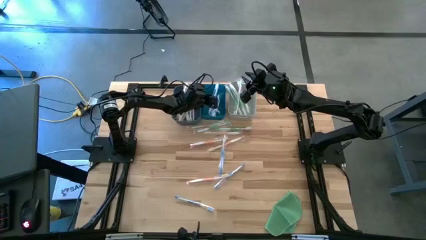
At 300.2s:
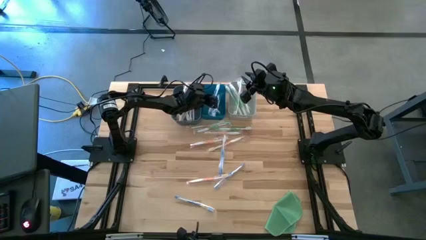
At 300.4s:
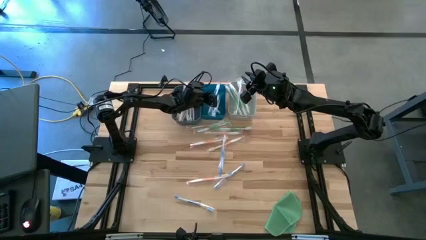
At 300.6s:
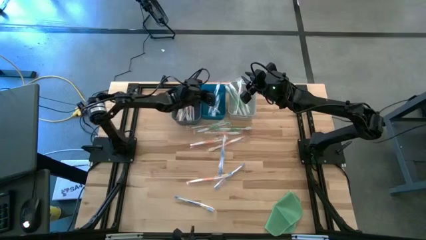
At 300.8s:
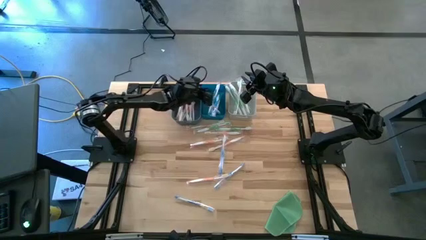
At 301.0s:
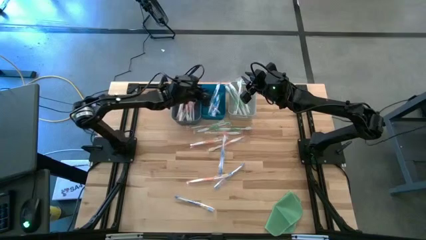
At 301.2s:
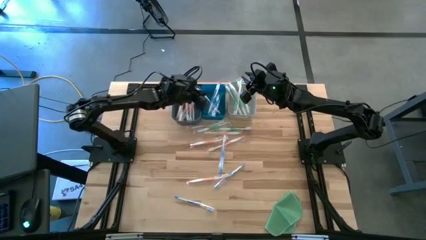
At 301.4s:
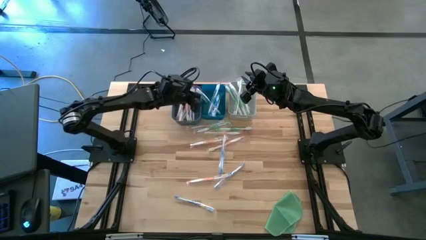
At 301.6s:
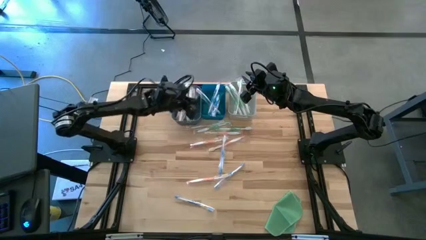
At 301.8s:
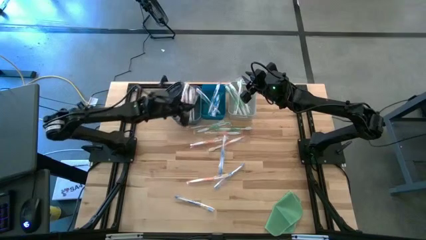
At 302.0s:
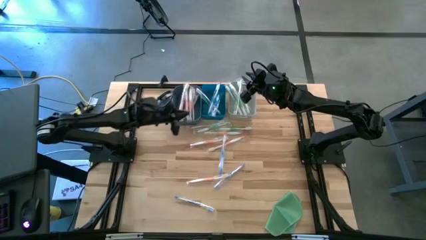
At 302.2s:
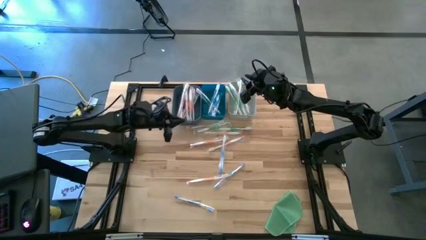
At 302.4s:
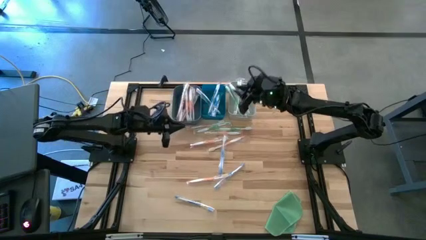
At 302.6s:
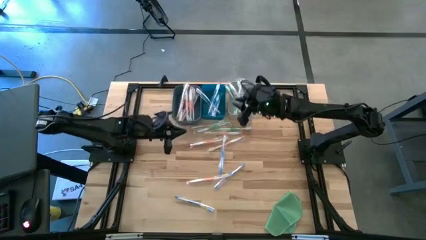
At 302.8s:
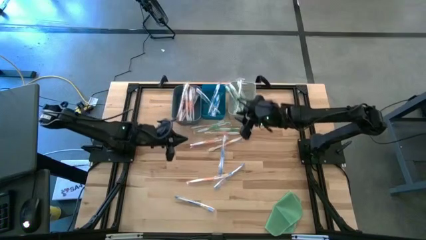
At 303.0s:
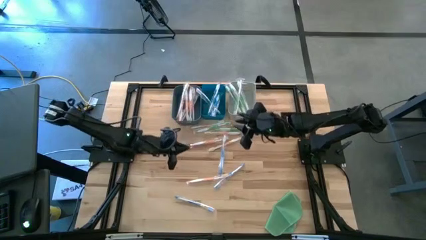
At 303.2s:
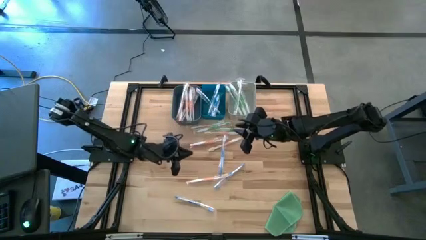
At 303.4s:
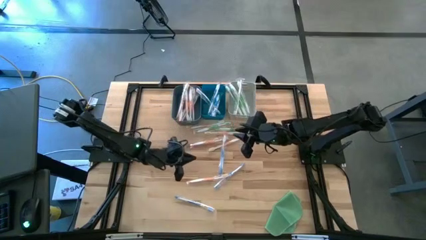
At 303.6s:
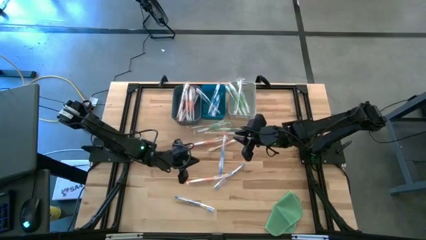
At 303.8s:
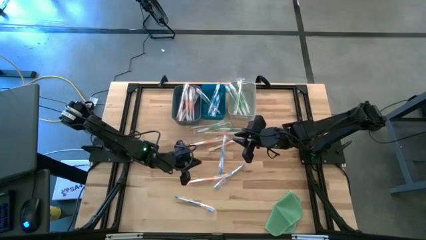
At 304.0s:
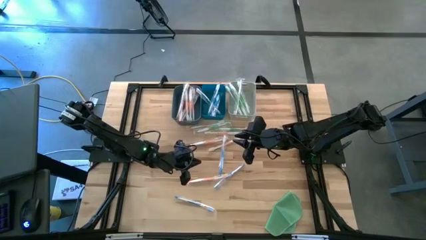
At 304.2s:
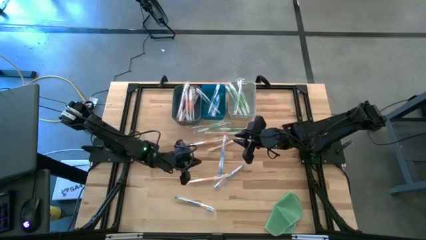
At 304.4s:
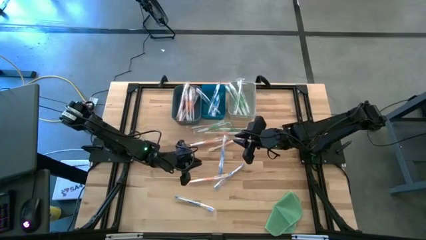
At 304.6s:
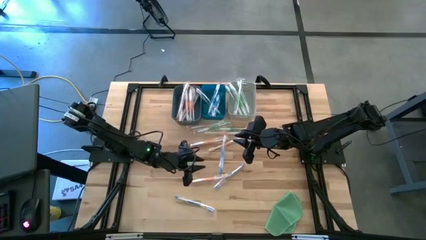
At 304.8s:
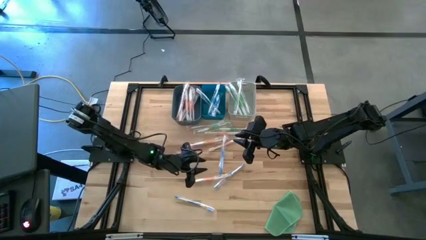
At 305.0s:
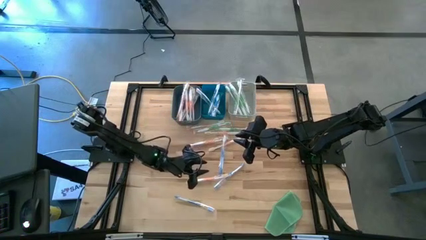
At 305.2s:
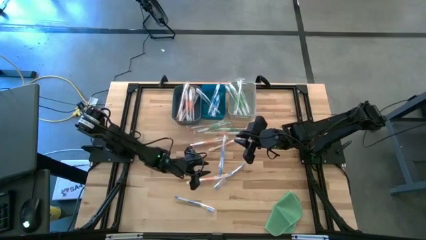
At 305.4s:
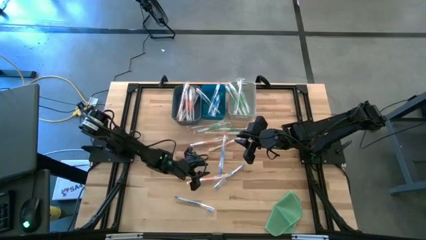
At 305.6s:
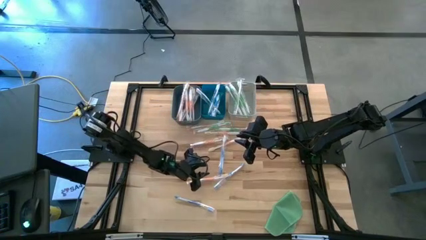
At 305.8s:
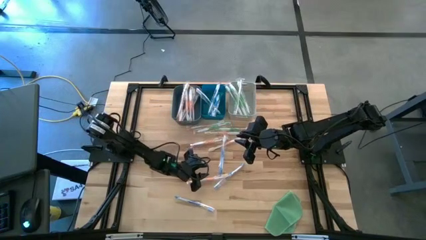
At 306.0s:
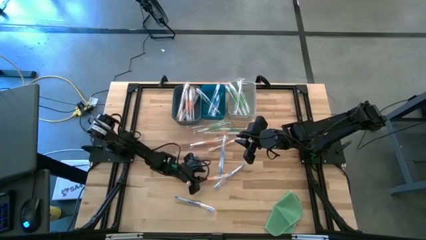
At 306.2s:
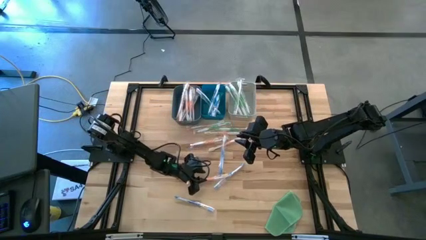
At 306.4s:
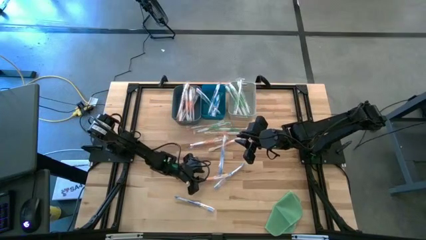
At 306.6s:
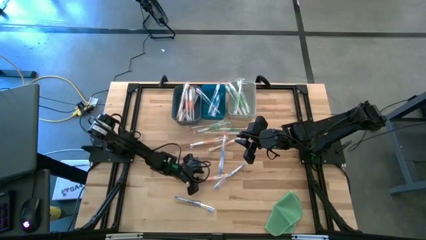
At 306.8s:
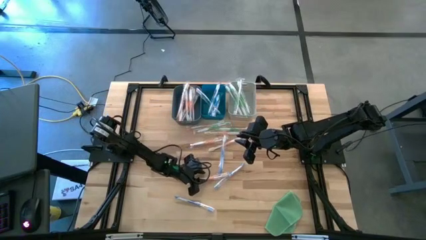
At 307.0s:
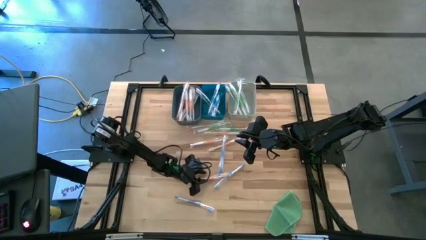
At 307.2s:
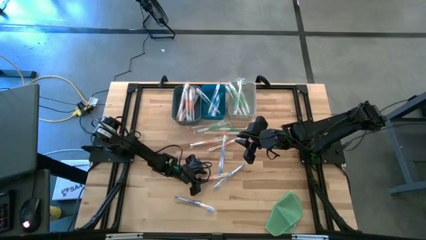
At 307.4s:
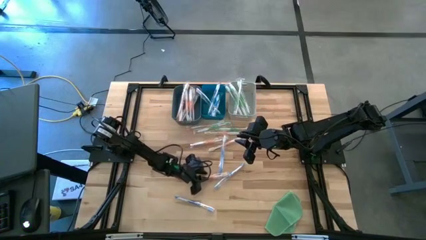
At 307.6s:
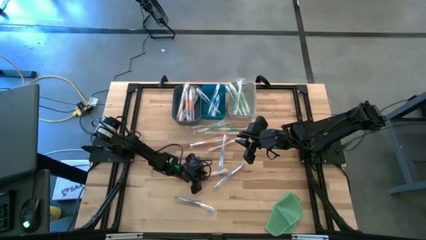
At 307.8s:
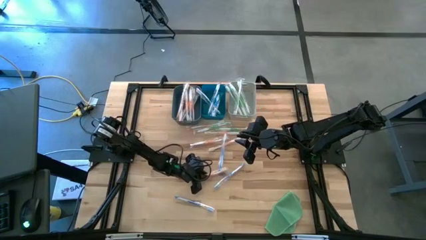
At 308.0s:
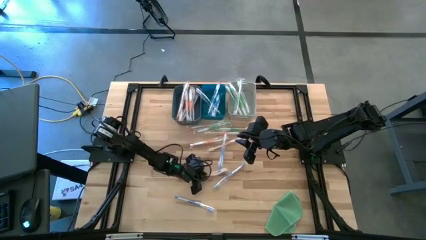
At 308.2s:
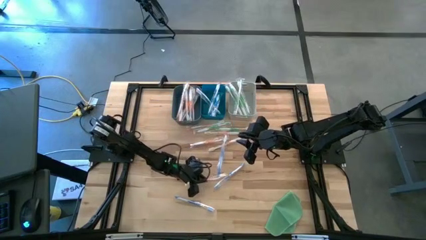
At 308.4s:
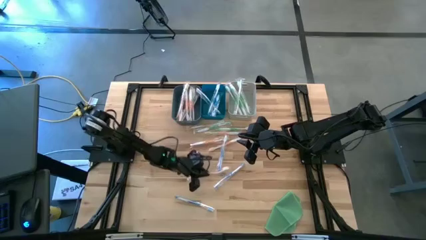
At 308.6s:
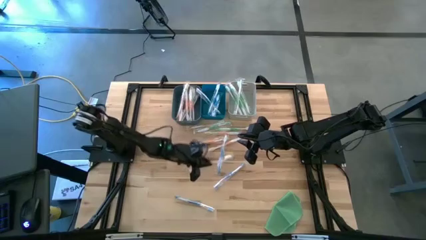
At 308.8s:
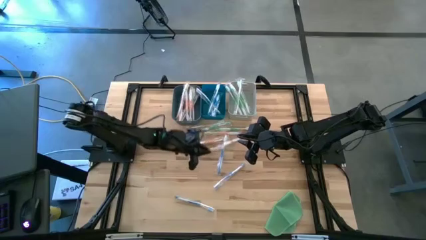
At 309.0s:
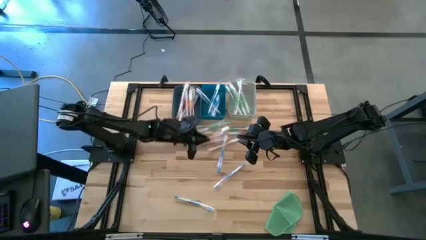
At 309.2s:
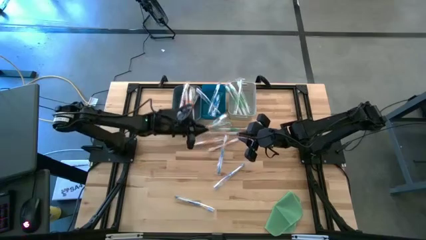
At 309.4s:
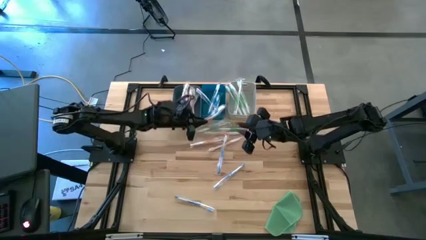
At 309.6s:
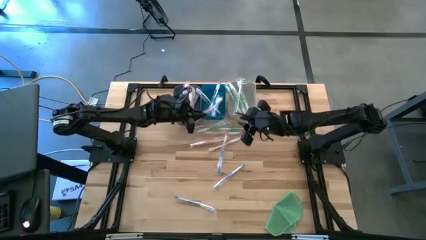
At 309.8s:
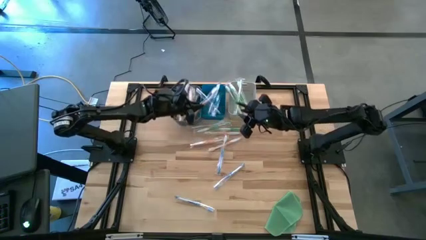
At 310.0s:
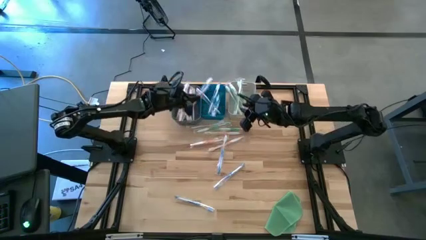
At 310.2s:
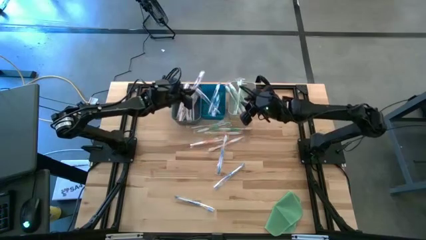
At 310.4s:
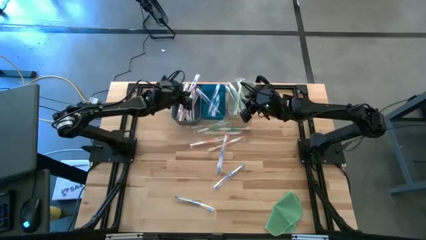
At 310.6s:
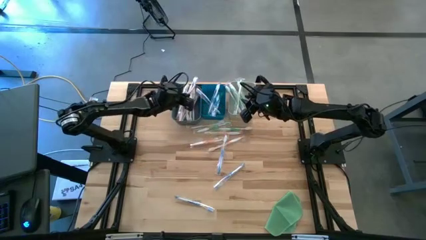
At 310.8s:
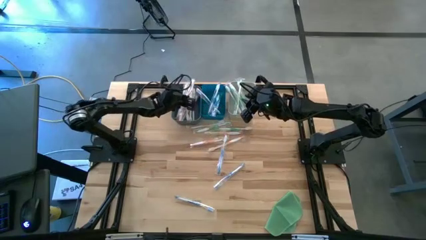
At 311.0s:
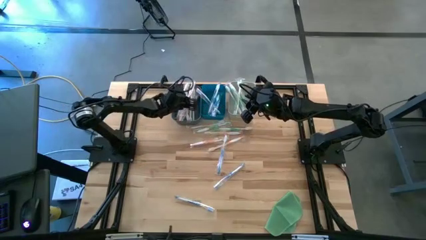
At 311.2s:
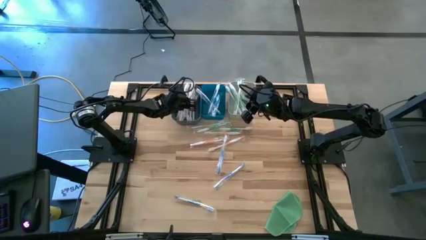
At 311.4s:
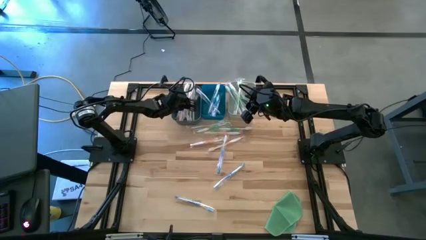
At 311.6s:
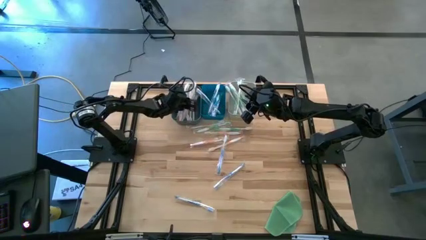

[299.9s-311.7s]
Task: Pick & Place Toothbrushes
Put the orange toothbrush into the dark blue bin

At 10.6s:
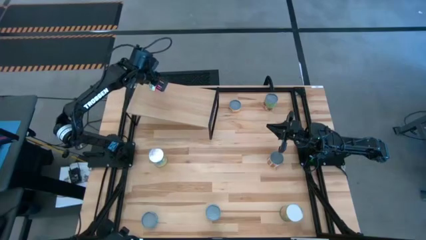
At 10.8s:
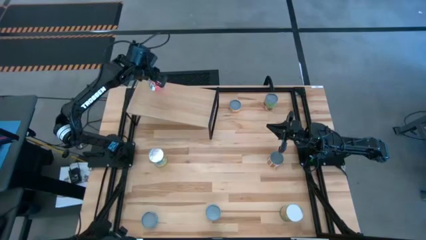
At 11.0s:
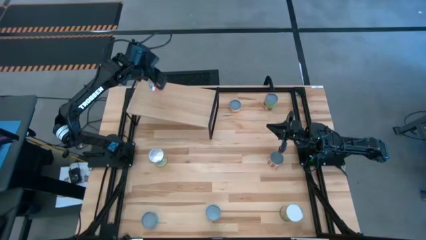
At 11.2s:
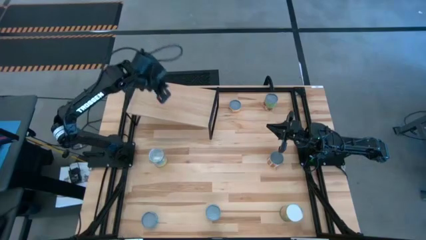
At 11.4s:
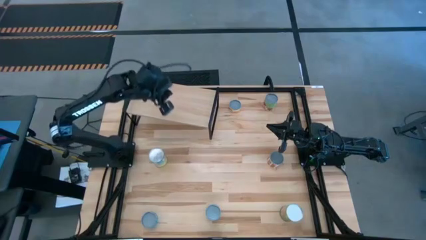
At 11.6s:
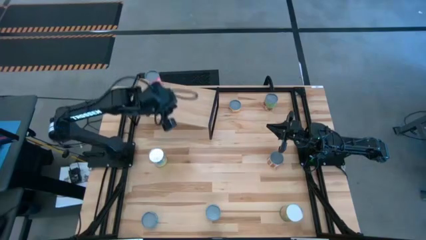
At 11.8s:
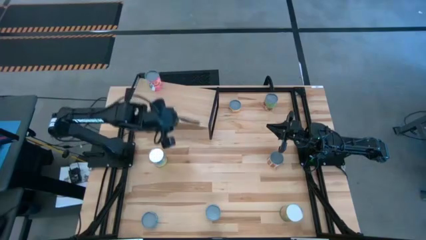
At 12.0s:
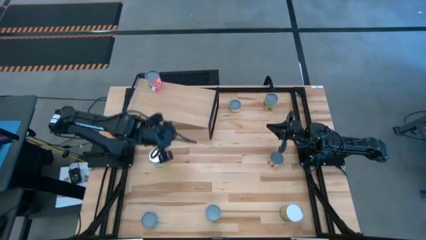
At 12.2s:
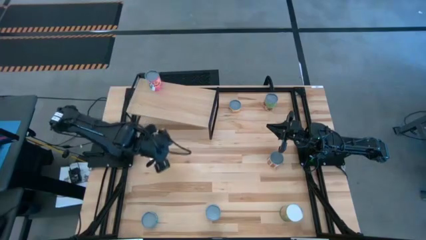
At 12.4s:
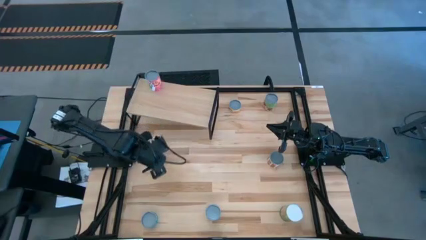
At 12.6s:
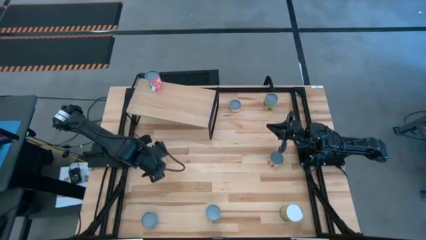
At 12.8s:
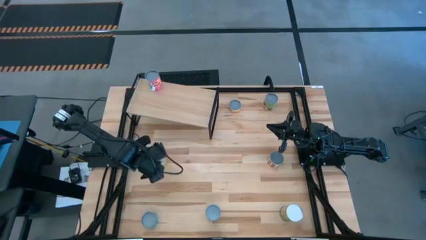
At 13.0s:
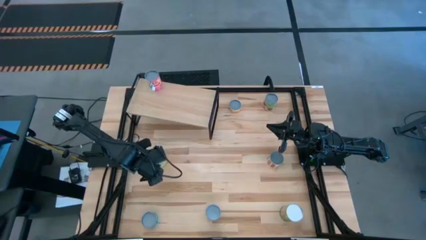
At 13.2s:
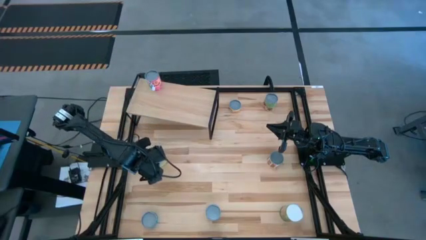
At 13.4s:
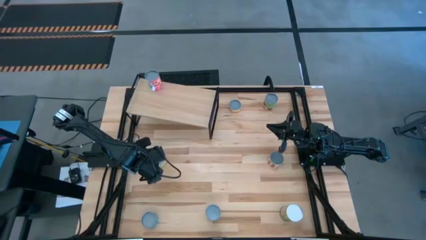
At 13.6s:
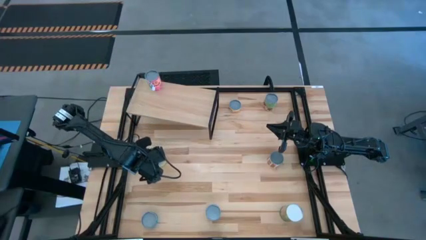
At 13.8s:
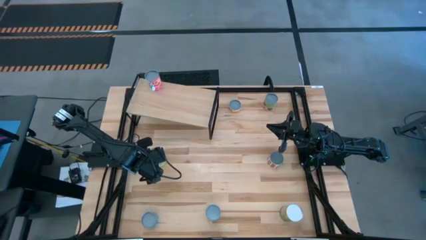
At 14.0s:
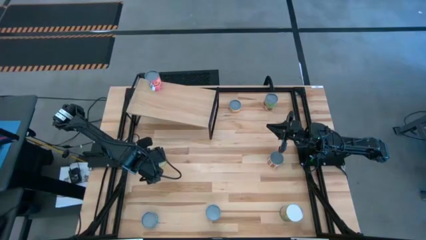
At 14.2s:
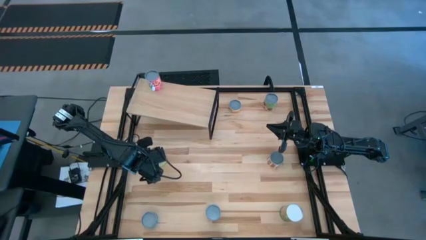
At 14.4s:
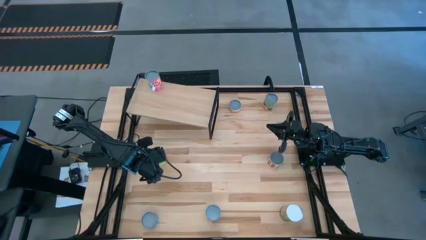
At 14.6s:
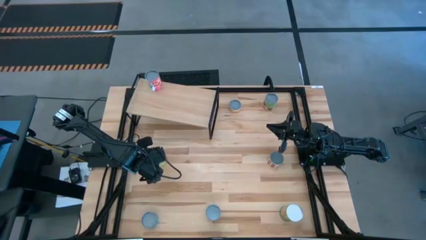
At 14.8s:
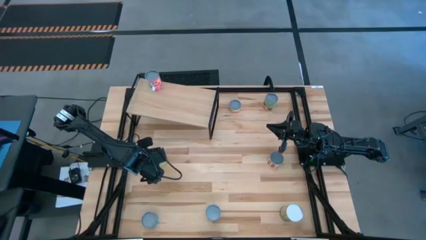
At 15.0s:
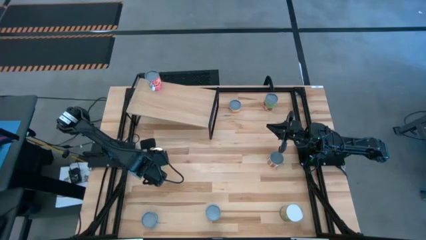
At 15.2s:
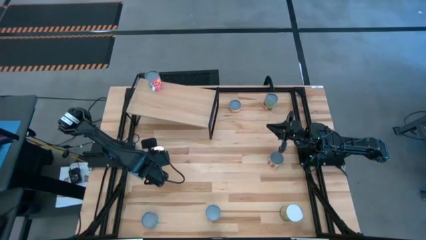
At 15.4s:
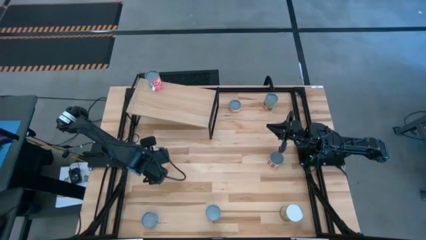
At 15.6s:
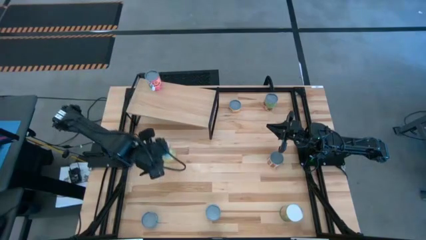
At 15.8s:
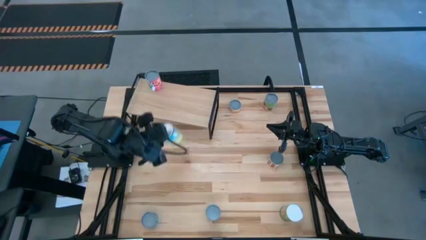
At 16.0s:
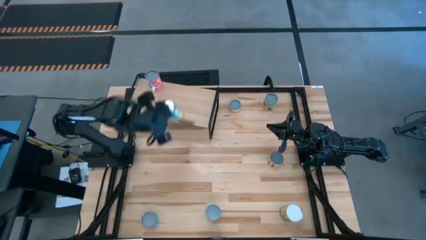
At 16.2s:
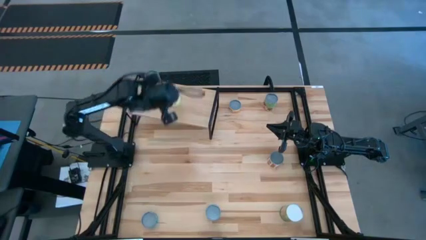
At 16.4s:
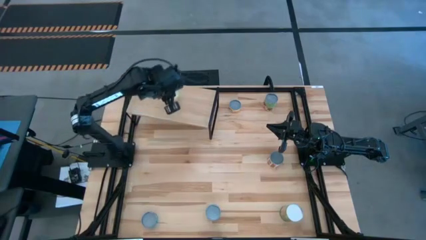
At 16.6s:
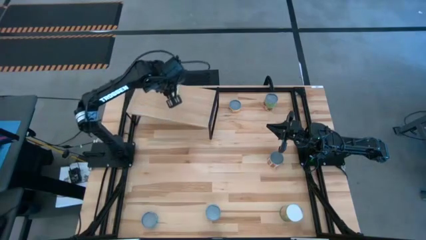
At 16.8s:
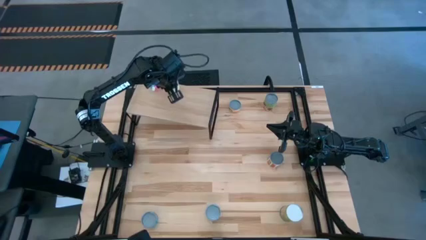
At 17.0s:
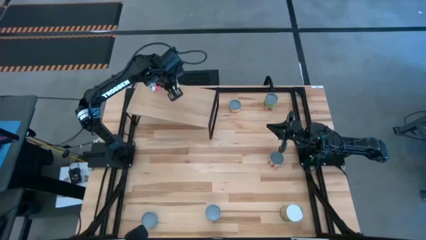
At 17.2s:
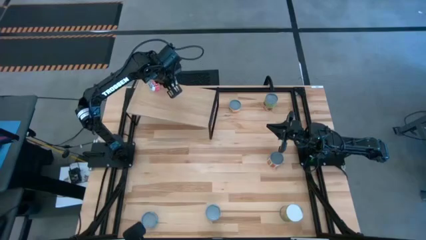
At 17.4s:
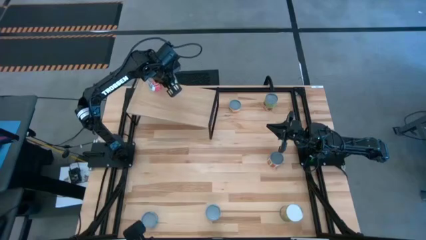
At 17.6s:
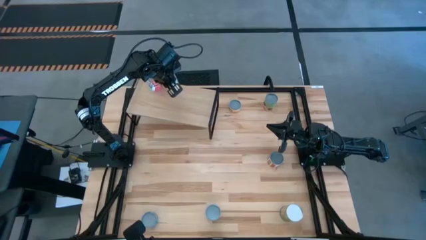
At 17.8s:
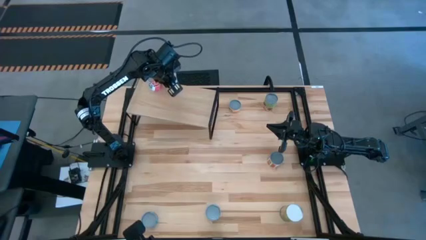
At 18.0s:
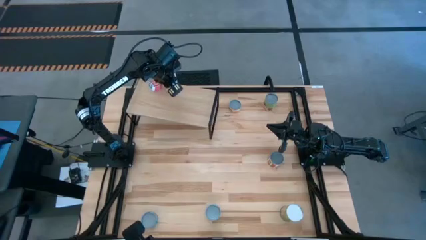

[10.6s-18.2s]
Task: Pick and place cans onto a shelf
Put the canned carrots on the shelf
